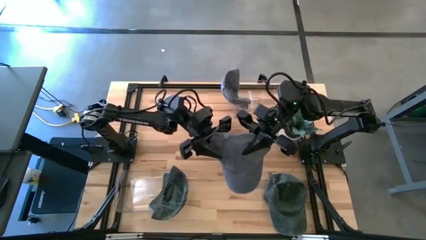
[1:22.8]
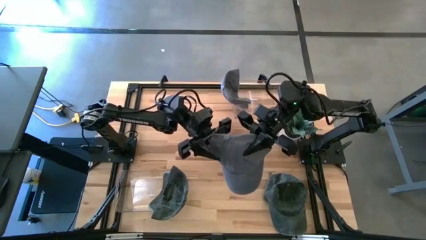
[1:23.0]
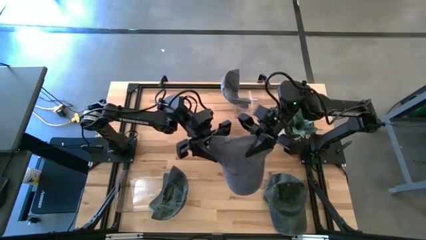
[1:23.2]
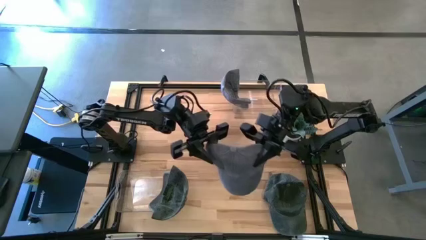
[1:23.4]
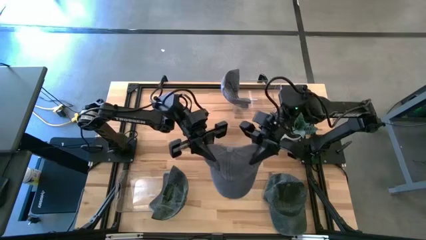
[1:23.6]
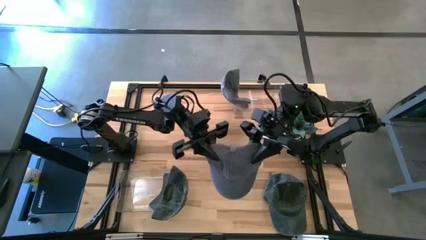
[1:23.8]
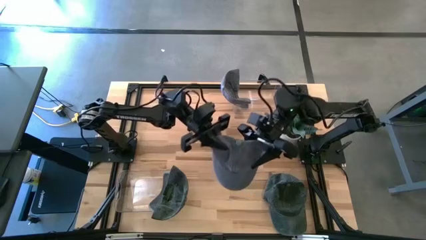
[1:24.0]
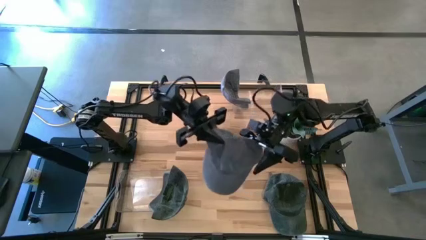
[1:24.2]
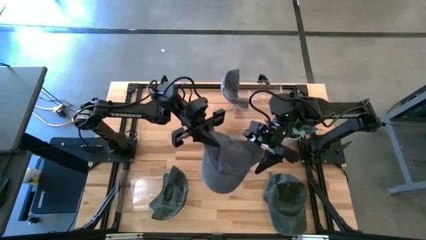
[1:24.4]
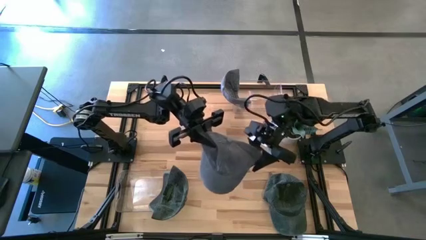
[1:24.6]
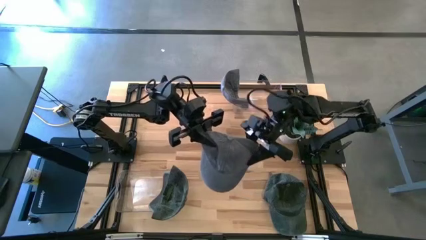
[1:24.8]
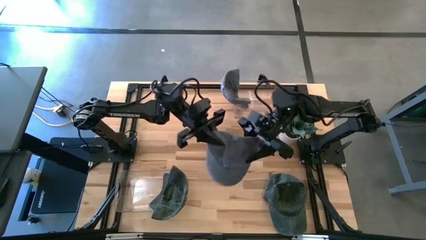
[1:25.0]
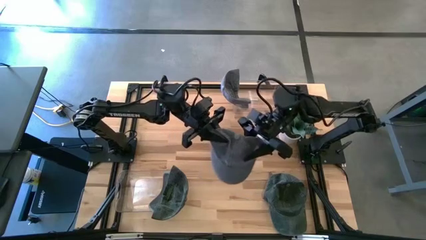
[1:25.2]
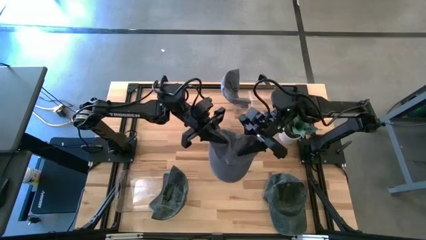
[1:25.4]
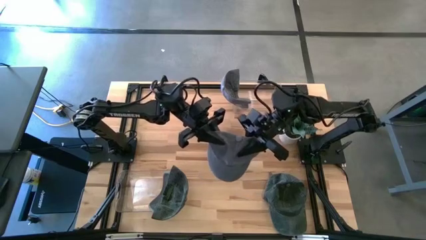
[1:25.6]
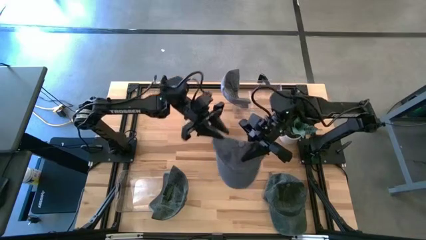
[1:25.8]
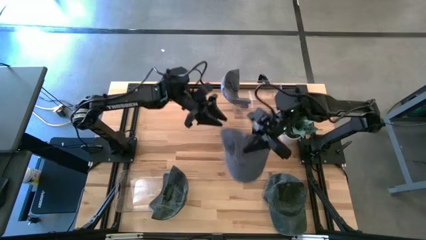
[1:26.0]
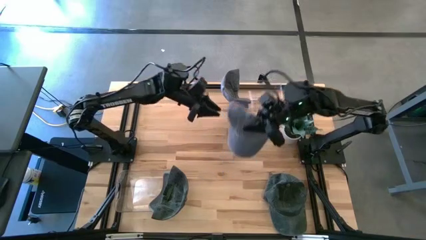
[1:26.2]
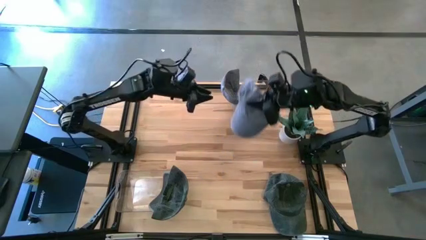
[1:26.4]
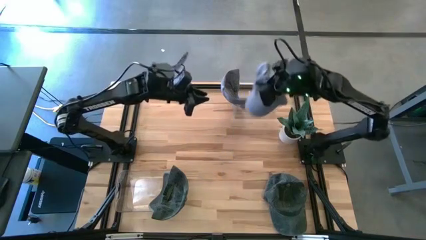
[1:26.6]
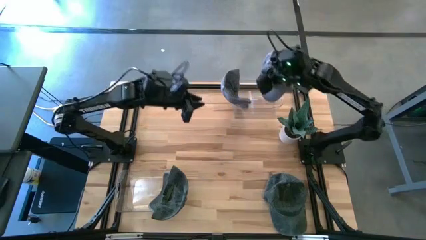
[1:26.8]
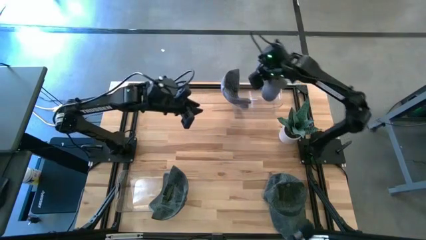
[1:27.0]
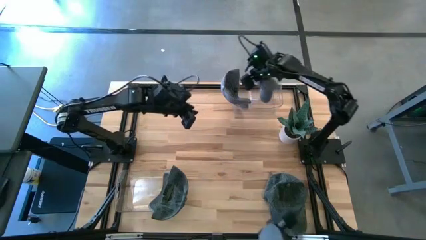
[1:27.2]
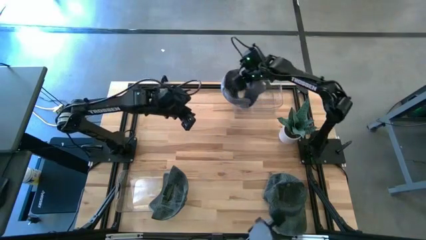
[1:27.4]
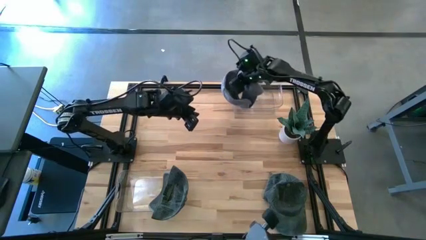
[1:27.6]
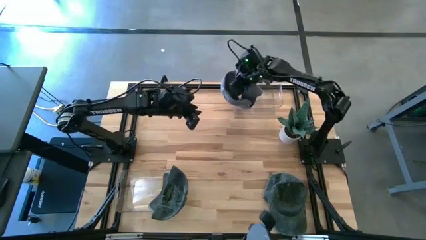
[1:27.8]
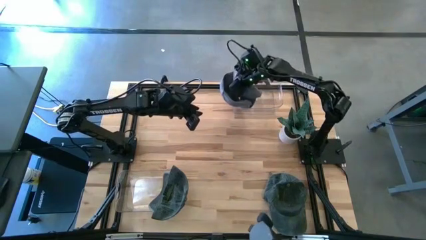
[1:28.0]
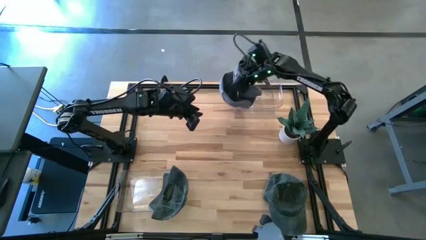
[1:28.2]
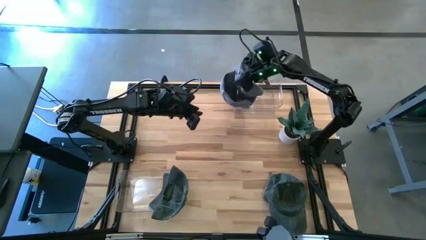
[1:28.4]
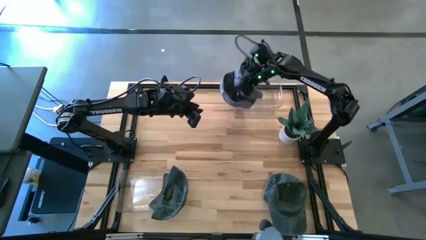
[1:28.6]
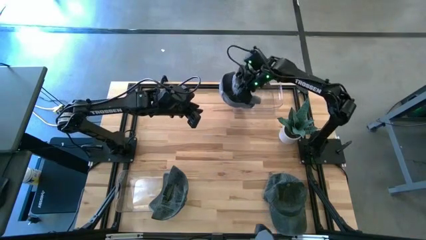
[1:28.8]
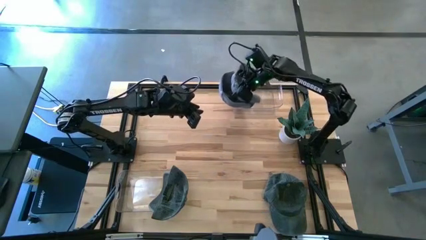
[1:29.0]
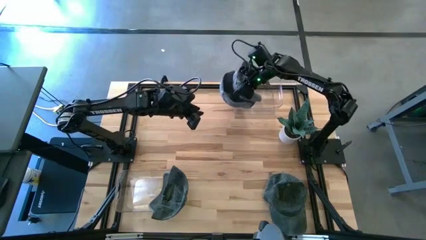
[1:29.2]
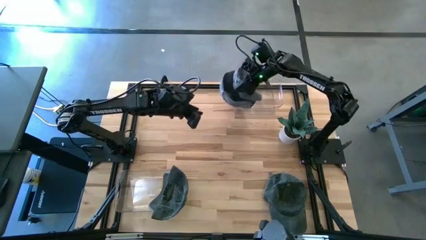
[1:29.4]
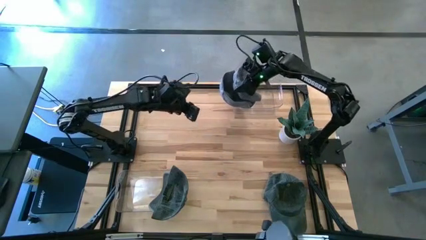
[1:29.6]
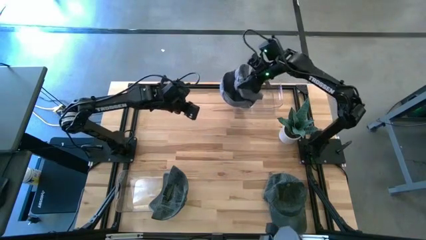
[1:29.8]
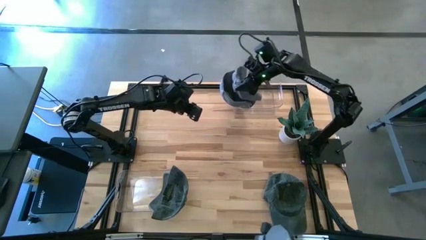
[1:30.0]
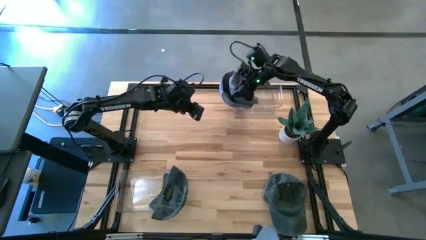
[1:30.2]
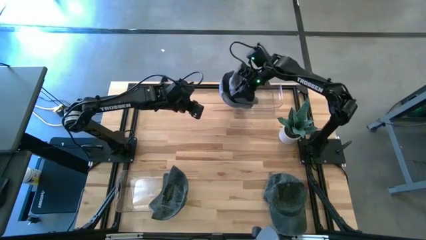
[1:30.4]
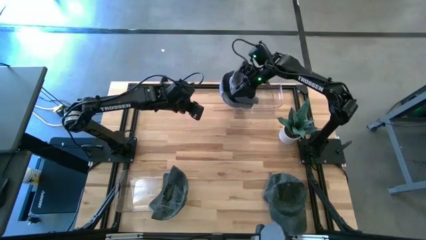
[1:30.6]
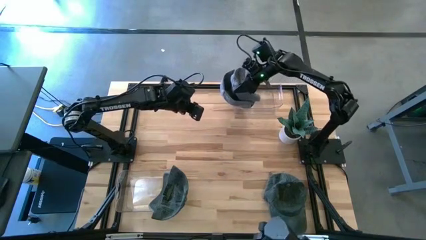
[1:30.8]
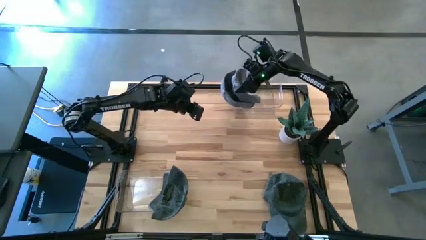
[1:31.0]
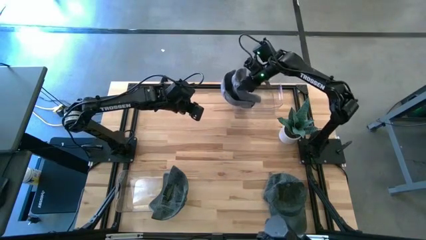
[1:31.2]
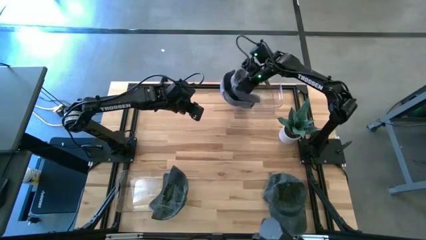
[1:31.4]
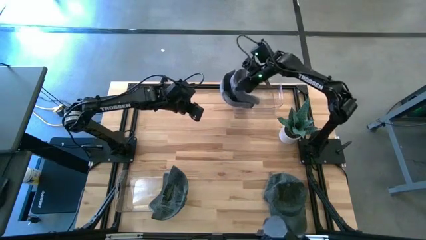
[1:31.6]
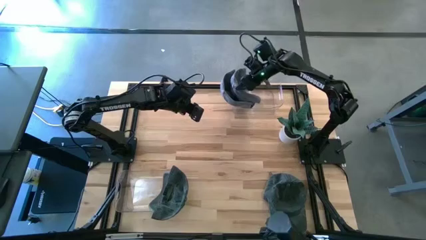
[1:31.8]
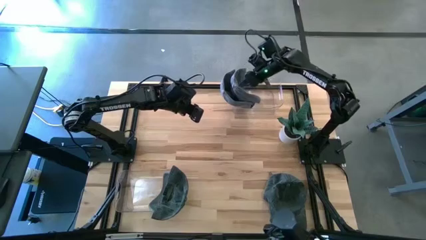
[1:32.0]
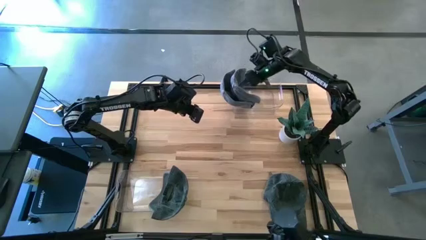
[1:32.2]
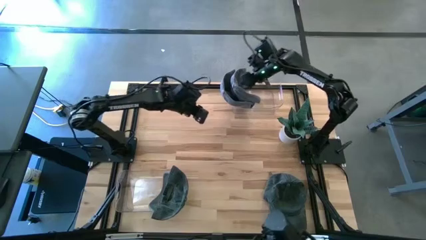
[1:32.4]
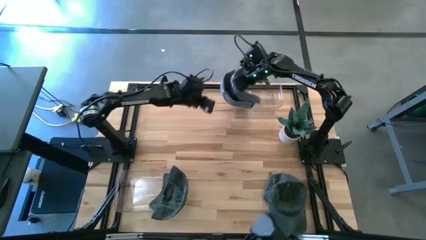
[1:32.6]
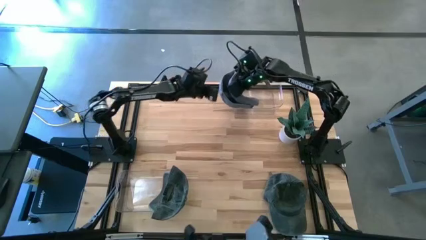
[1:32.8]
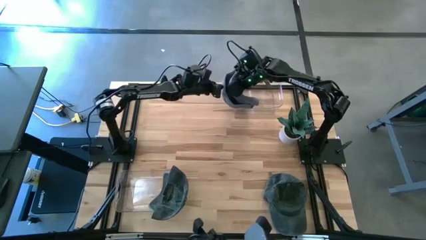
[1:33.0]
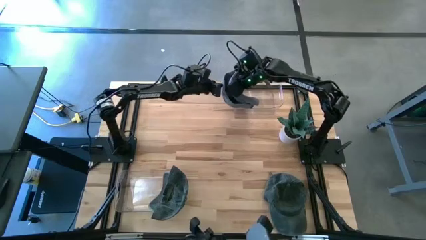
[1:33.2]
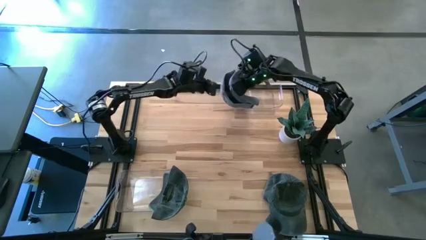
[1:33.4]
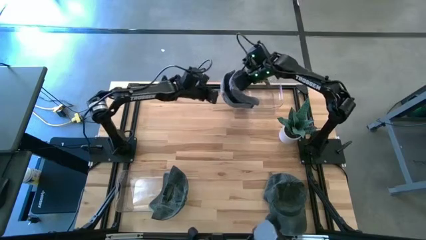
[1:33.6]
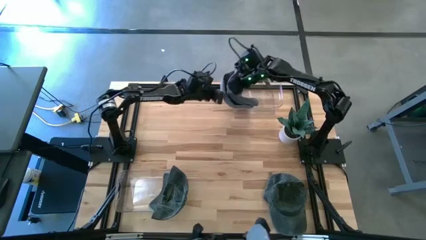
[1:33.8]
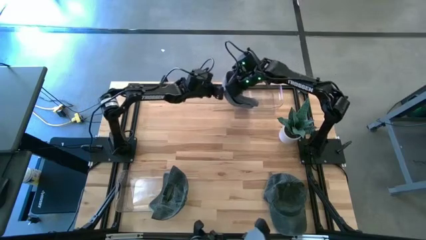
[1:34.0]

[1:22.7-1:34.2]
Task: Pick & Place hat
Put the gray cap into the top transparent bin
